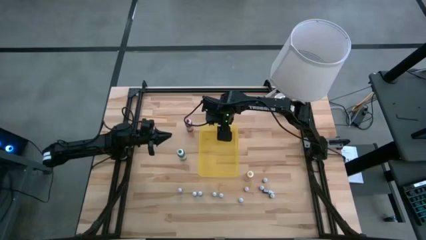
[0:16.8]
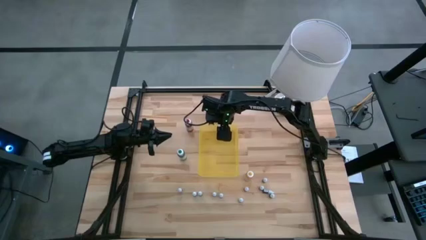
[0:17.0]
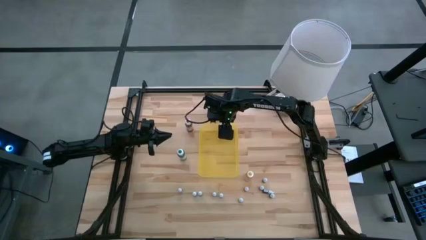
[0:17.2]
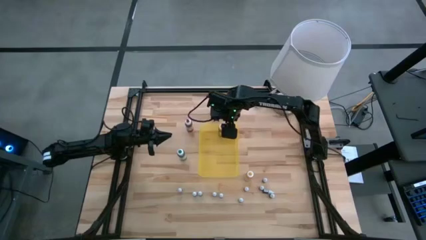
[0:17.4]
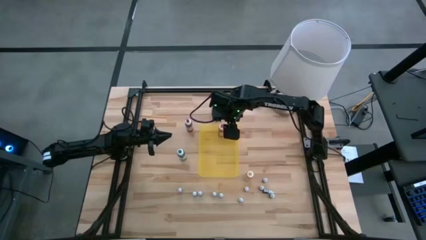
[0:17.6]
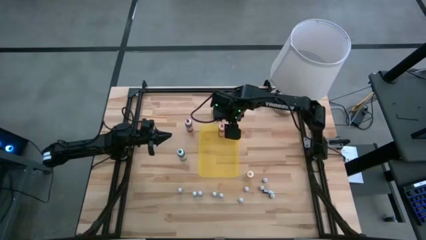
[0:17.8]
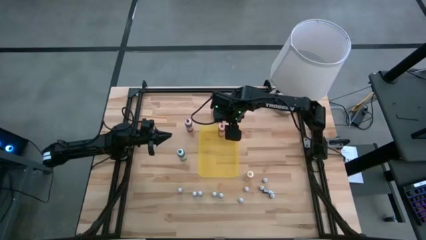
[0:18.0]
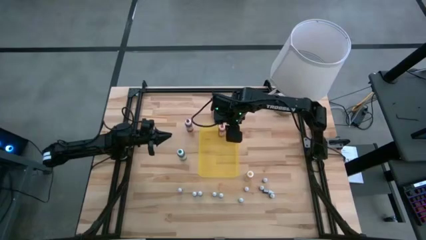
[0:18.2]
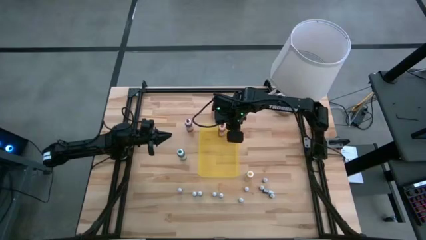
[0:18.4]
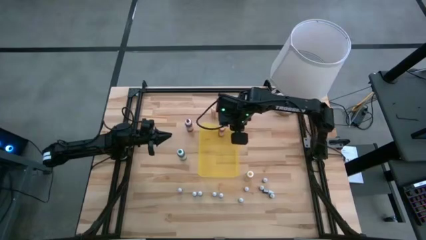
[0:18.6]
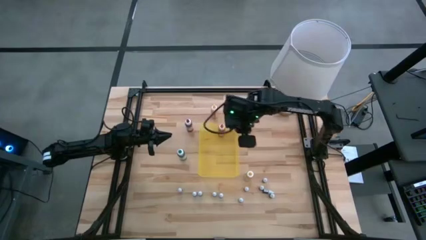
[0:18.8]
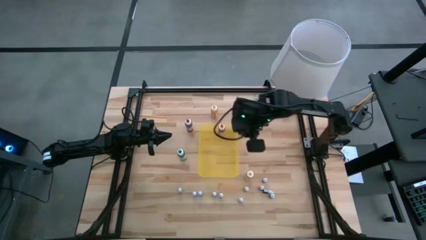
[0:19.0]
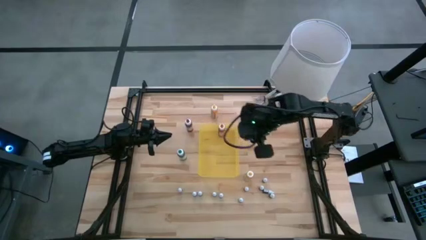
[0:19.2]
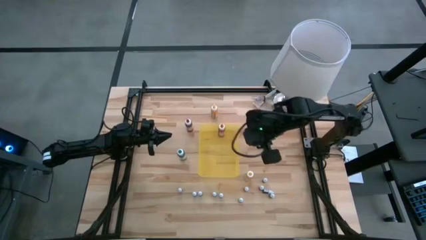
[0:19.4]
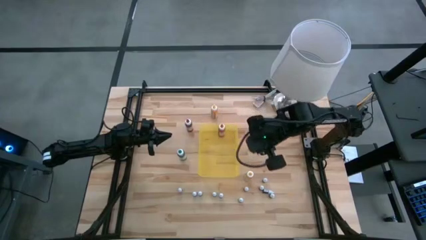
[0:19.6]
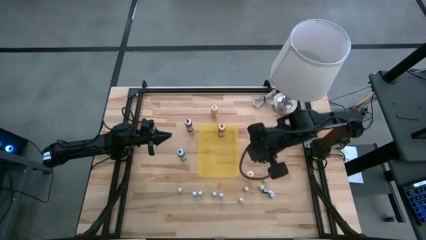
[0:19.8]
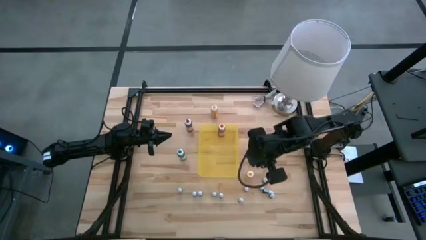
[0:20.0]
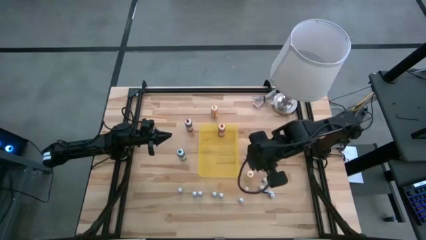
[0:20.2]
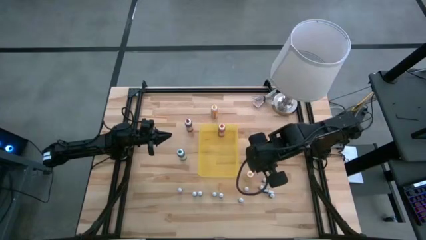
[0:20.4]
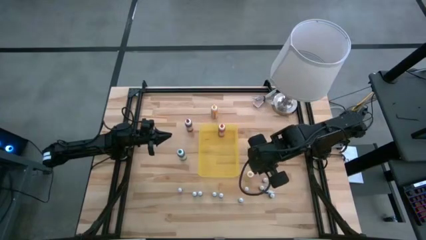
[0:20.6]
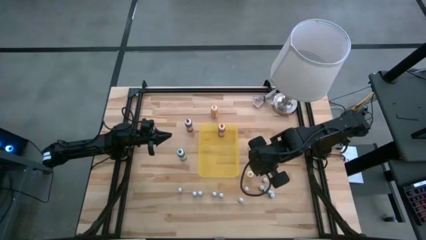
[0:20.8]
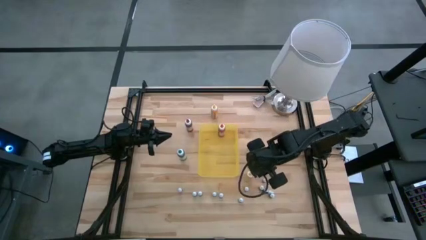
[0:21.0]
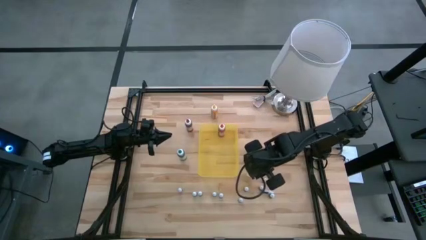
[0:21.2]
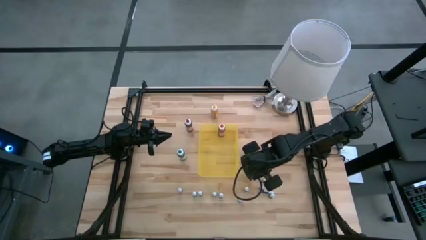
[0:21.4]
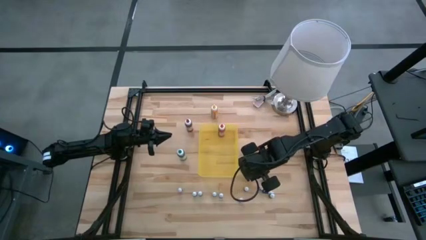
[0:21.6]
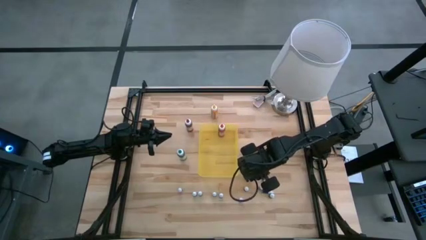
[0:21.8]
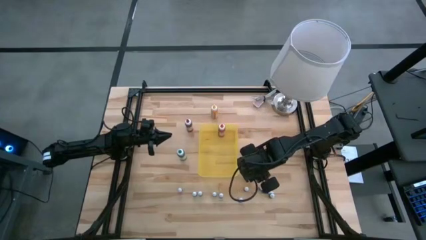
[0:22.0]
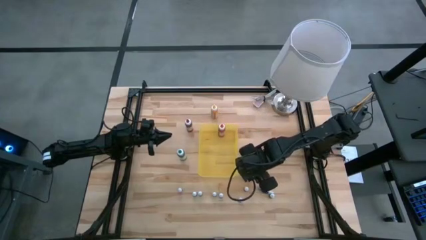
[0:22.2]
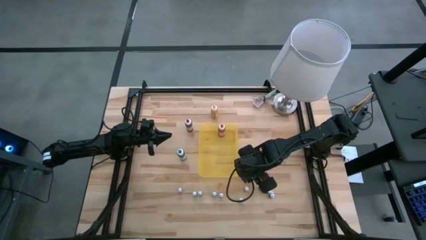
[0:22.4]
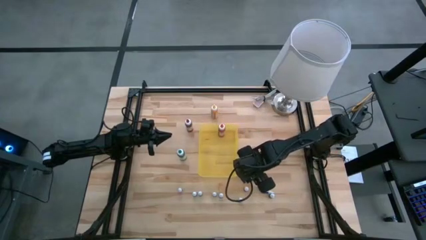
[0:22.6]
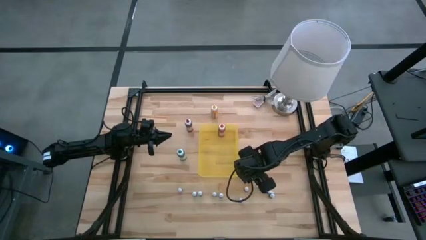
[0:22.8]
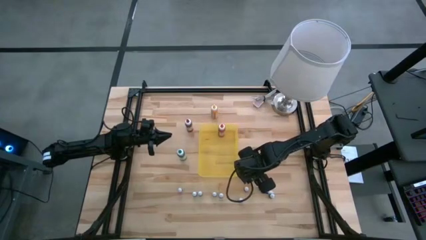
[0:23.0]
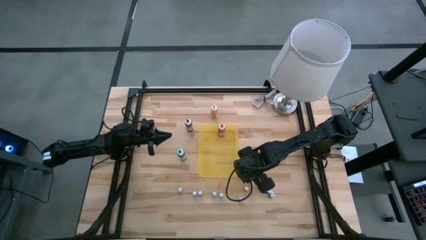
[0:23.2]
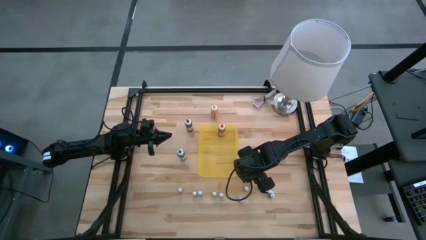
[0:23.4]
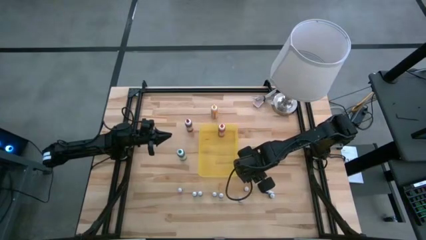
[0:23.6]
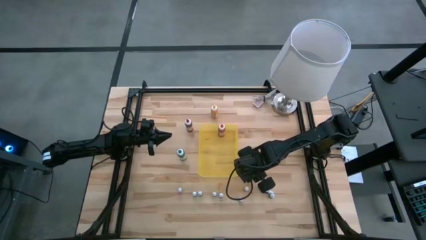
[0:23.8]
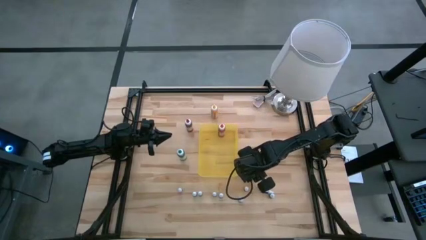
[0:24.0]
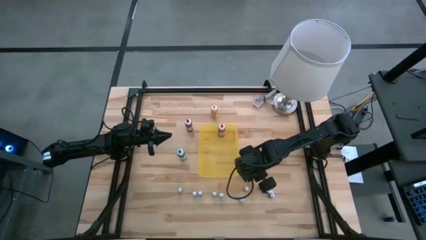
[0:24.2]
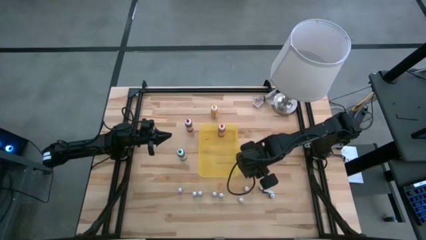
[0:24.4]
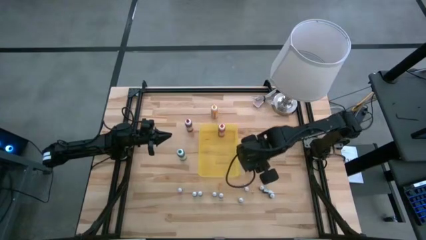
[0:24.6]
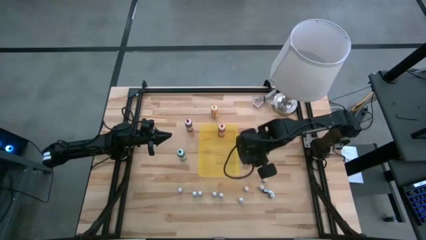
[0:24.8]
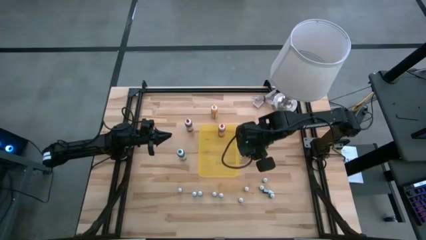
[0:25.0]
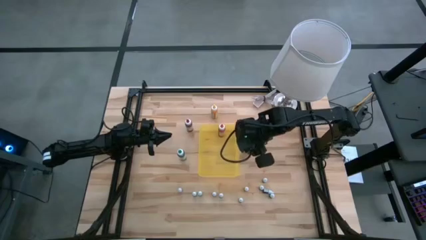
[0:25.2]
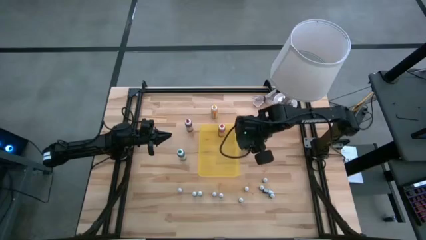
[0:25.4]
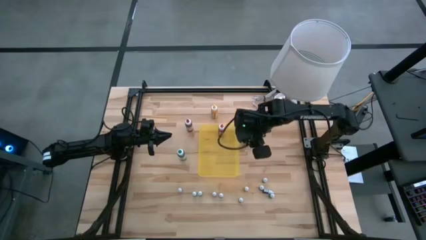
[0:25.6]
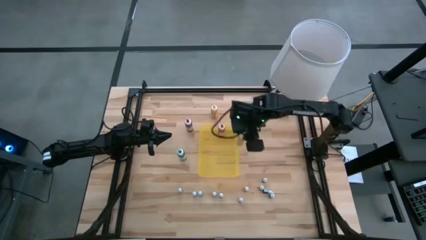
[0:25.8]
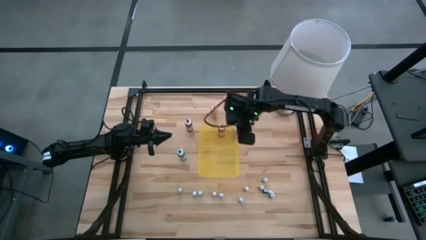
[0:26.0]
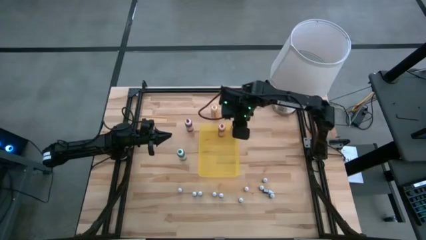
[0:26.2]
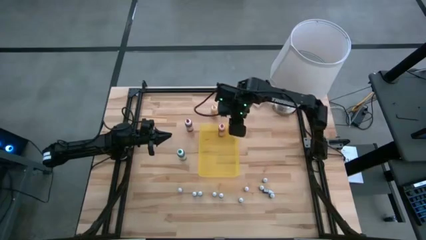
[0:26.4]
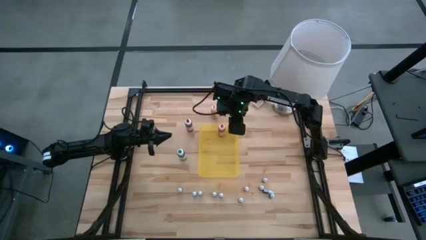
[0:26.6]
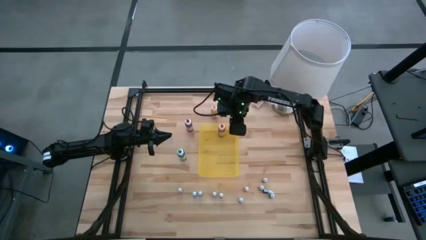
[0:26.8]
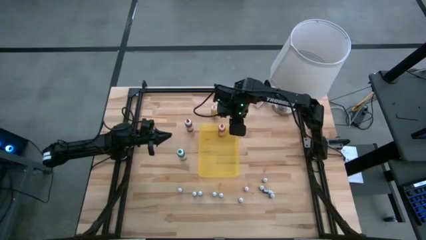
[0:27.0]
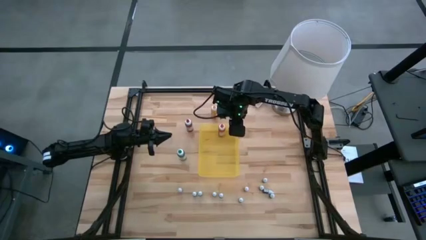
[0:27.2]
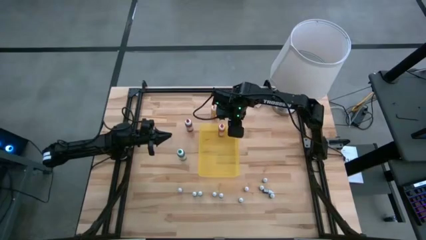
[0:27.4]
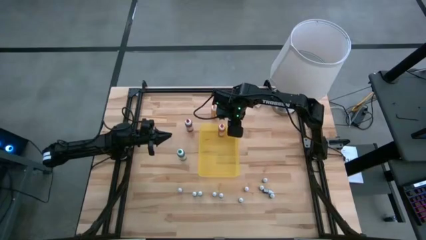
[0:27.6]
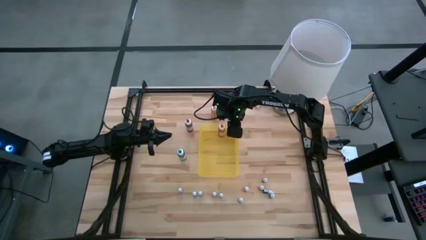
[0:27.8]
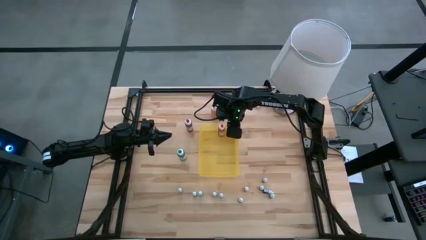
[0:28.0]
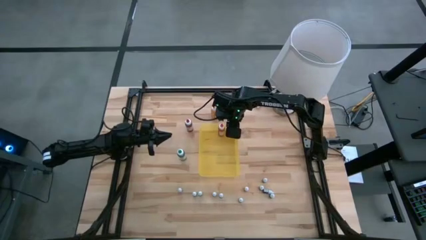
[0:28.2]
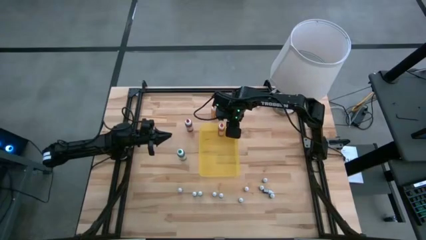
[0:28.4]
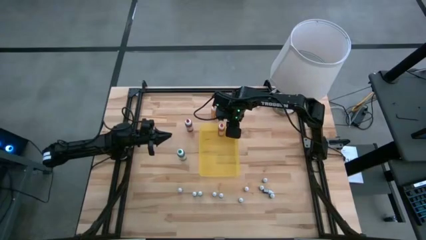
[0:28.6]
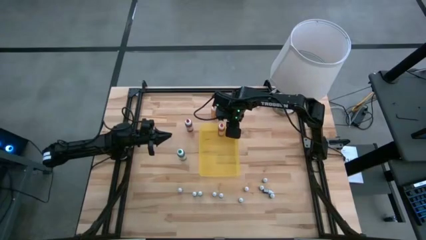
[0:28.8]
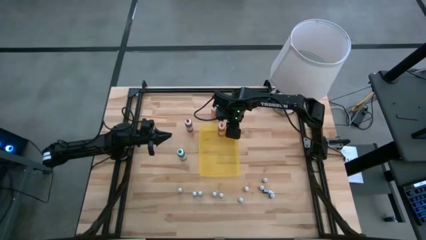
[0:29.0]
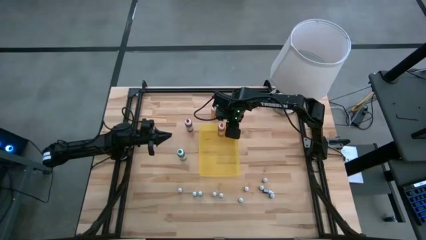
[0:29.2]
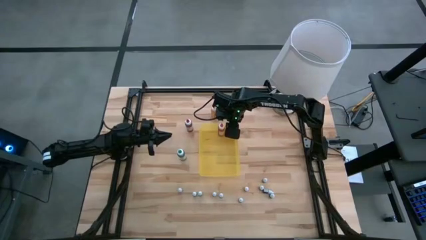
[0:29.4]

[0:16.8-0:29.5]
Task: Pick & Place food coloring
Put the bottom large yellow food coloring bottle into the bin

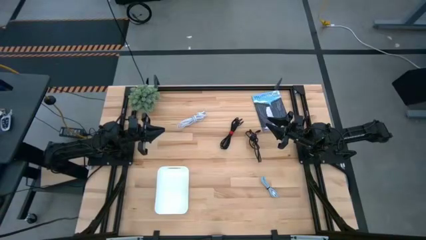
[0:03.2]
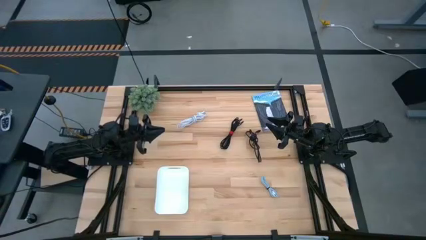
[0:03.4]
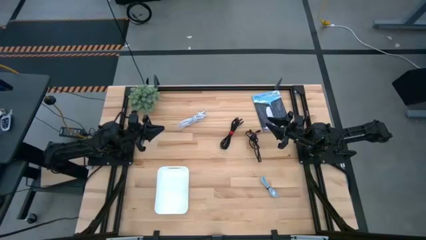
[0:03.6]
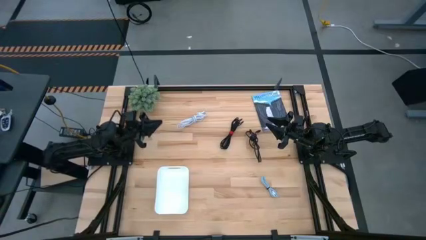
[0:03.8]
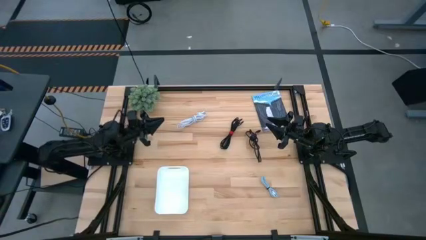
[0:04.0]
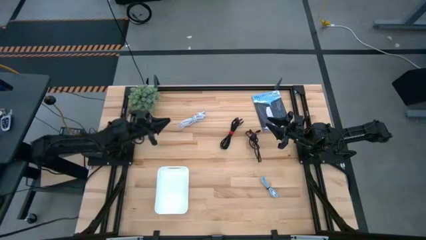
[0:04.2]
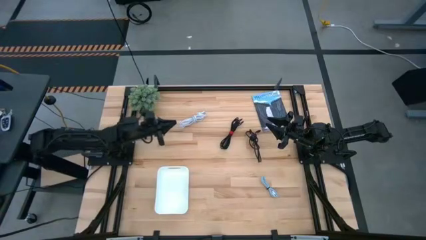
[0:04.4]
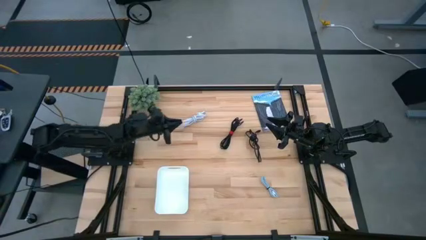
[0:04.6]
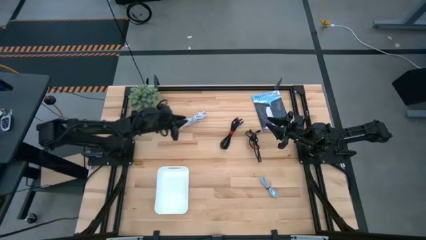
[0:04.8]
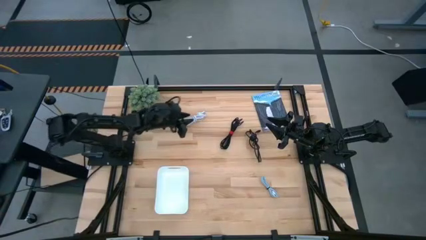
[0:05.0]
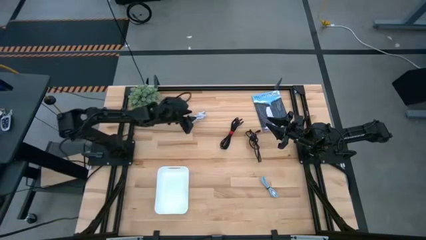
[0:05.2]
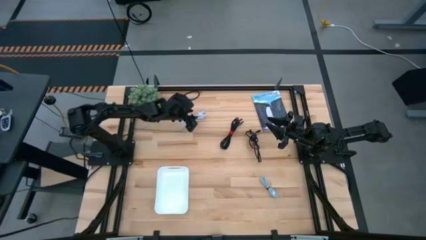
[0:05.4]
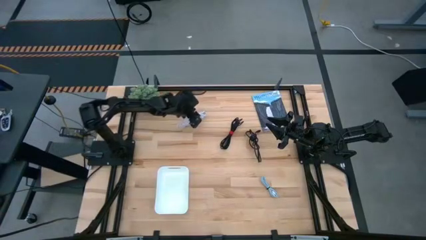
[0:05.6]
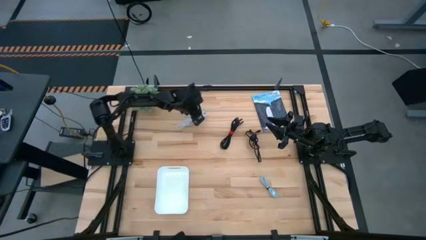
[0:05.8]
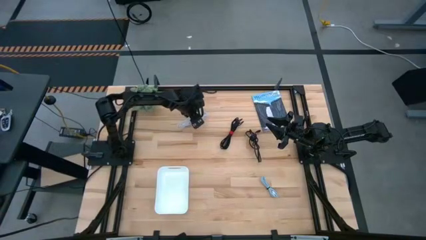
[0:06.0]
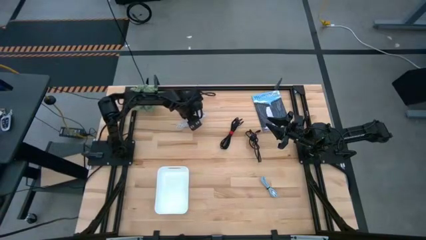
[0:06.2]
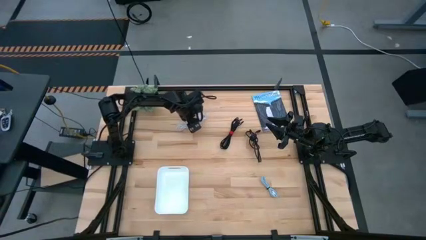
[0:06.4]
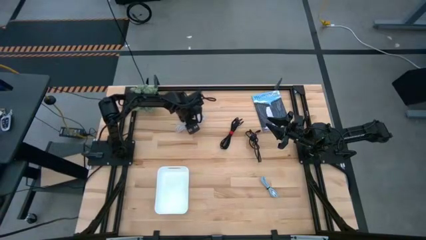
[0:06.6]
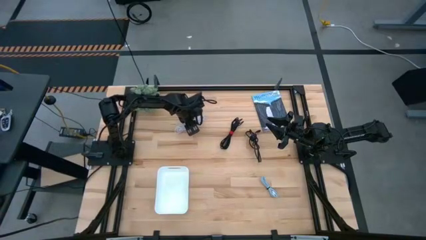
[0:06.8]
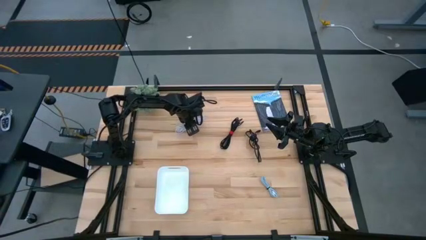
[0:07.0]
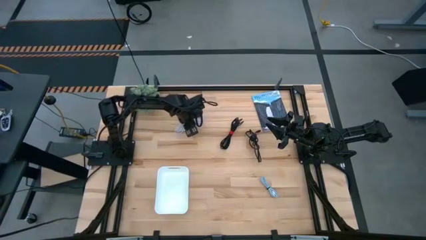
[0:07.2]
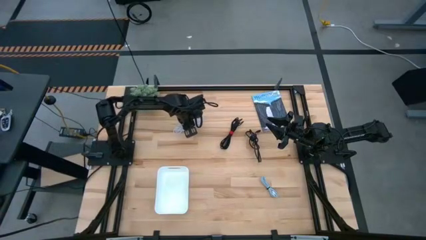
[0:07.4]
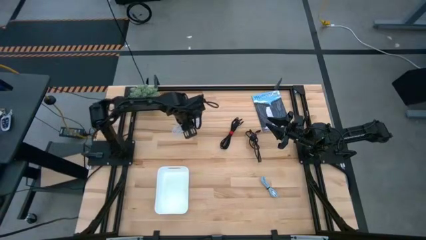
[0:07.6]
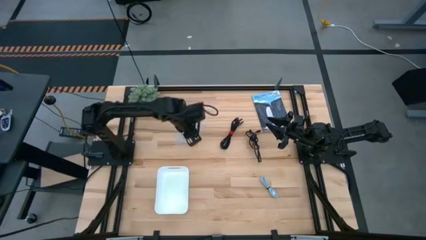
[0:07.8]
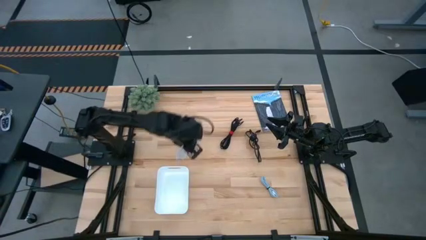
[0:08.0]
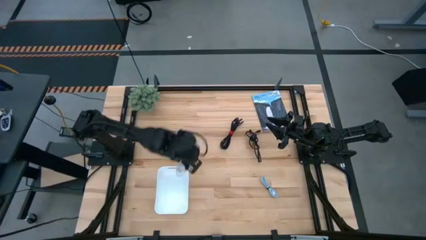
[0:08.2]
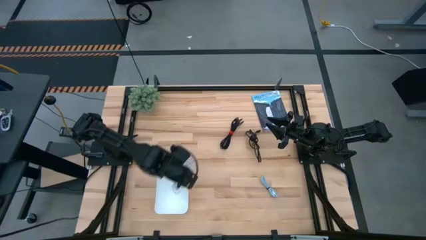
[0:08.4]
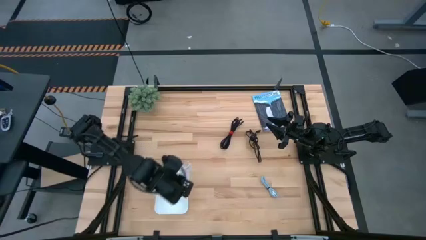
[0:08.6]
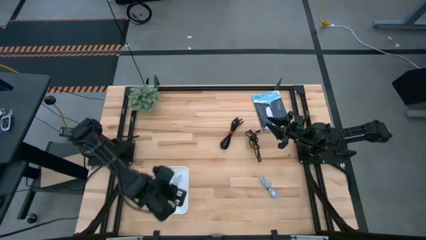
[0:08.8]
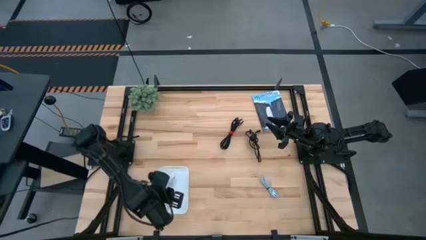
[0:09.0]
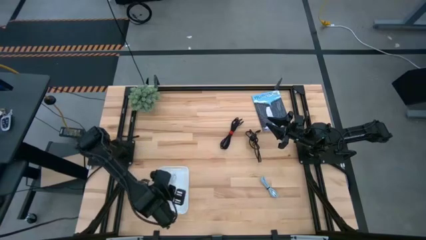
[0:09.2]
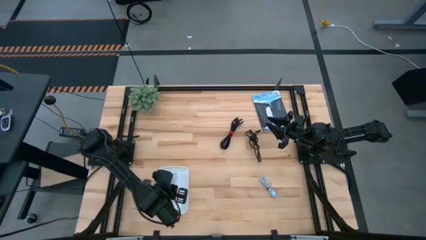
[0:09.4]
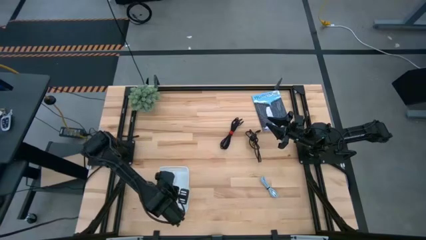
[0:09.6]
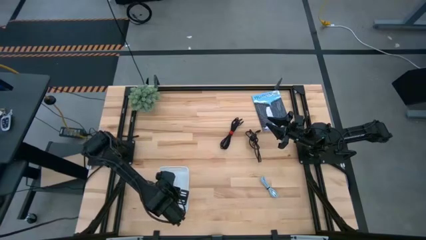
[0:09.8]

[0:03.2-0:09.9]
Task: Pick and place USB-C Cables
Put the white charger cable into the white bin
